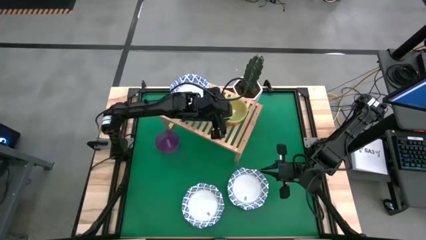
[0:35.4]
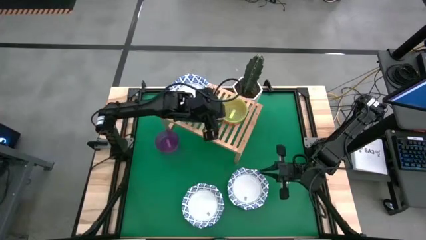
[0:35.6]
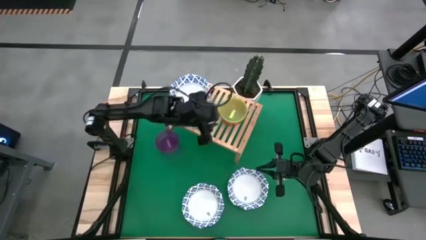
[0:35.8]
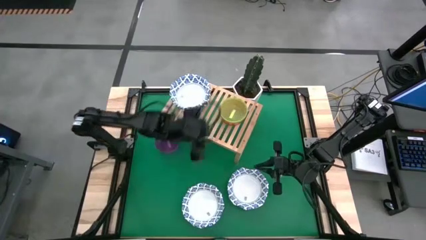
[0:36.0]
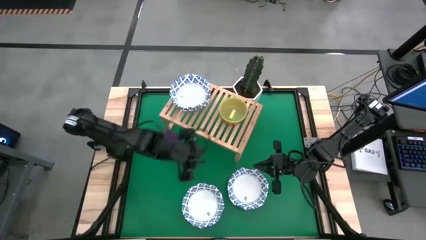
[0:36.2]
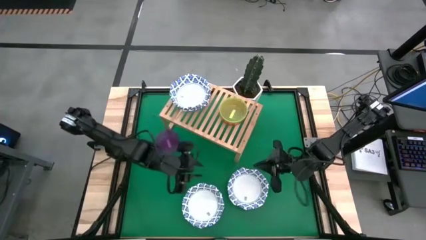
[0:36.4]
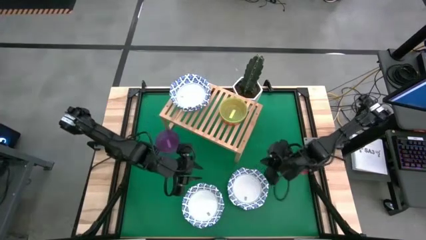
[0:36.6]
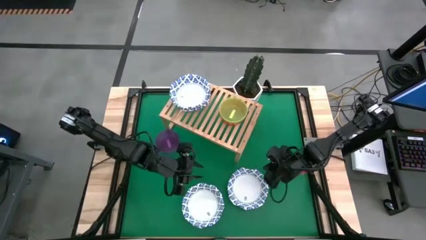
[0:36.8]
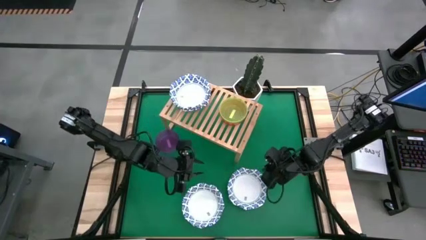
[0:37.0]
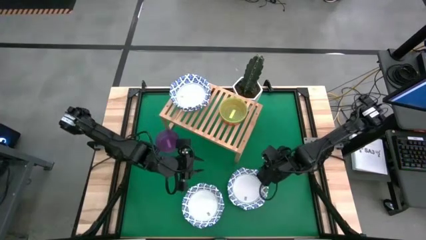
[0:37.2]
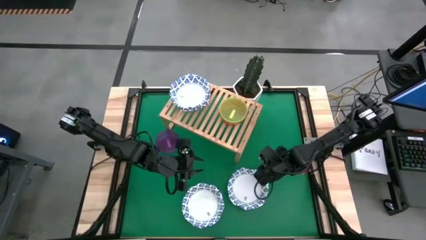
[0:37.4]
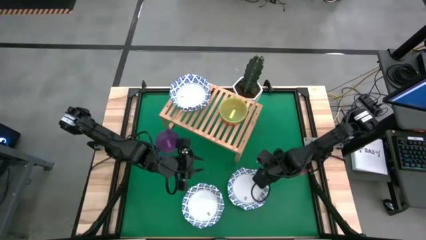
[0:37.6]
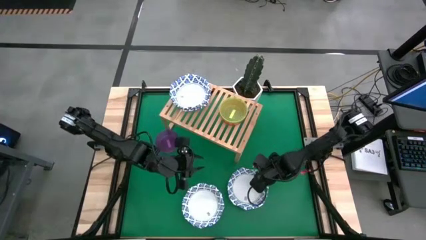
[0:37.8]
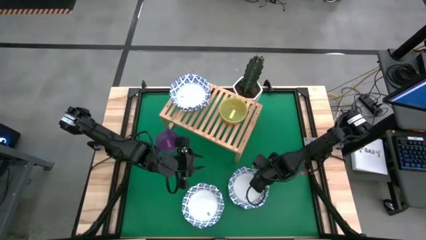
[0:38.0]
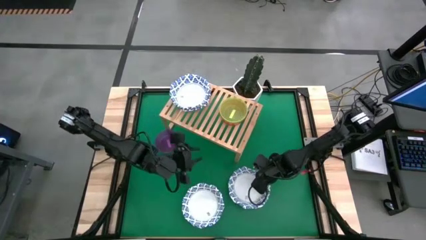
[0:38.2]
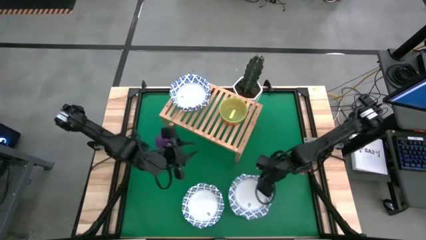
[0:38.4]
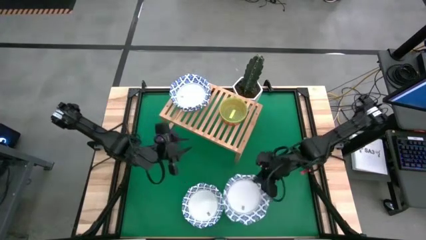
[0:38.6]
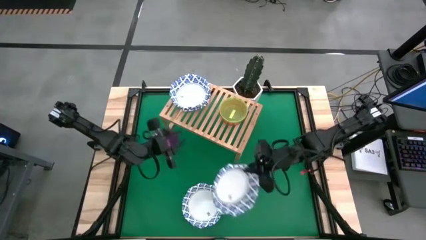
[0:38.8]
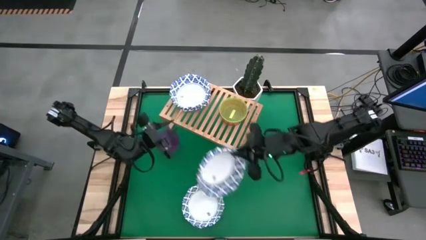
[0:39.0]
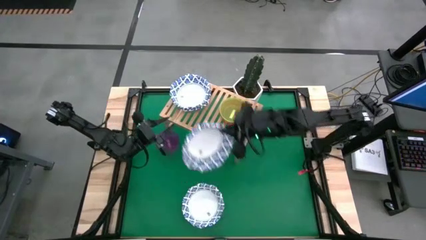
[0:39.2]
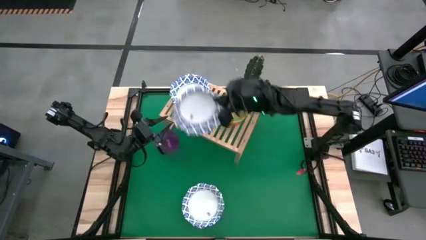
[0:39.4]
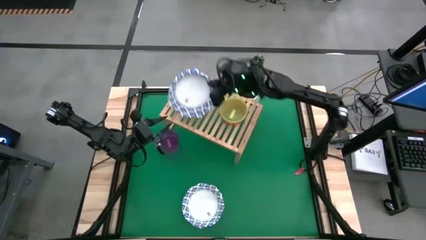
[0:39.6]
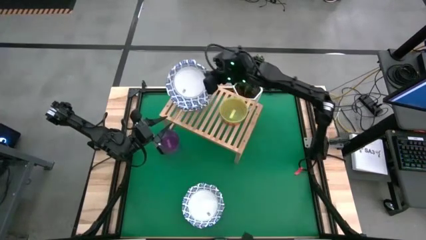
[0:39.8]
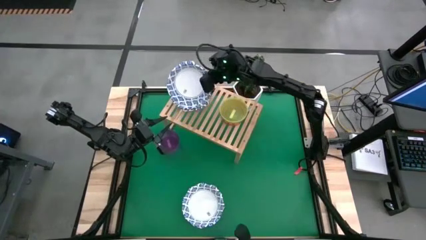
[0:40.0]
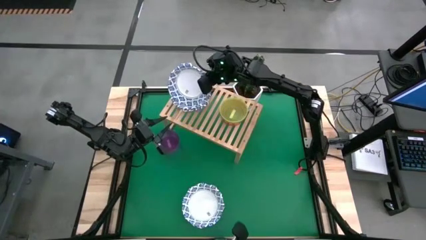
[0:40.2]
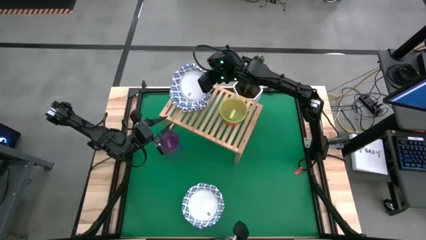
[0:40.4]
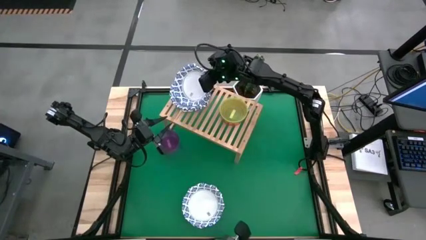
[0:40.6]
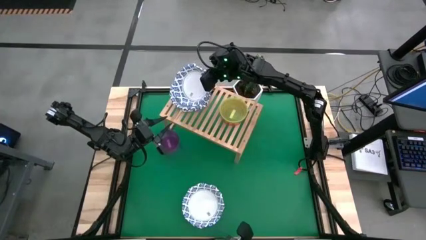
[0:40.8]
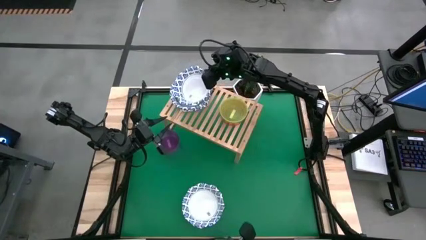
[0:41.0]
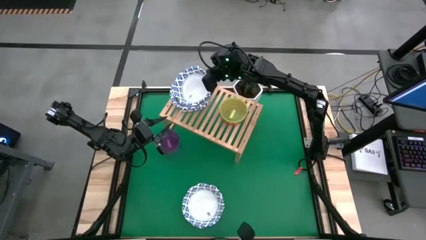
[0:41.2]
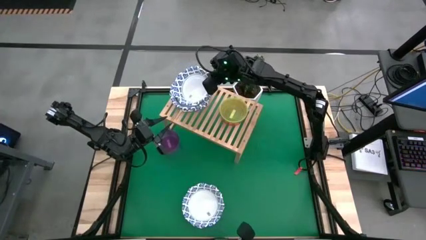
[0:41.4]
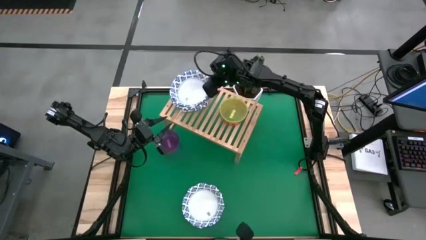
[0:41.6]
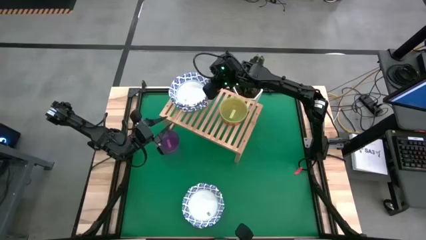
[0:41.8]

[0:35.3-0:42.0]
Task: Place and stack bowls onto a shelf
Stack the blue and white bowl on top of the blue and white bowl on the shelf

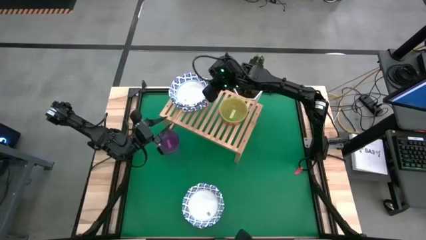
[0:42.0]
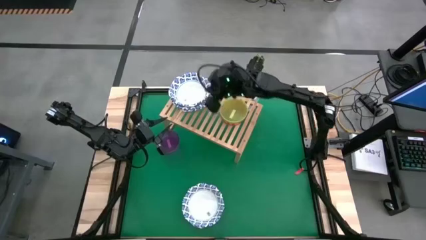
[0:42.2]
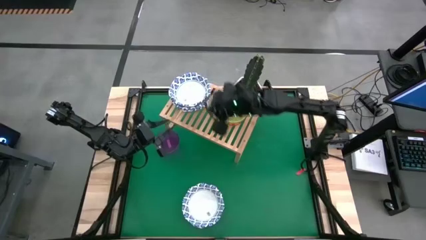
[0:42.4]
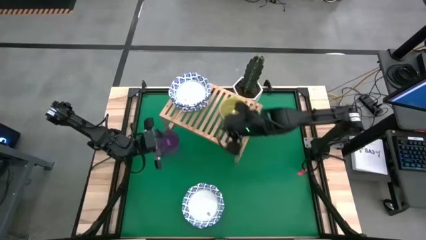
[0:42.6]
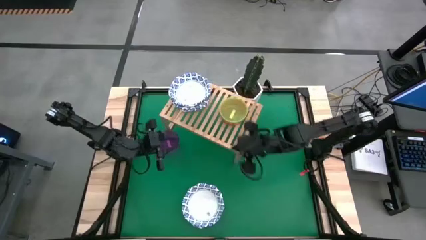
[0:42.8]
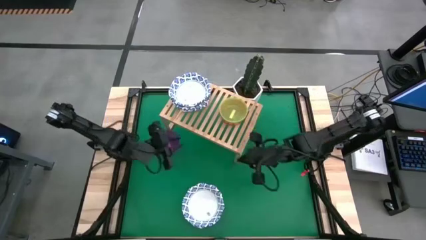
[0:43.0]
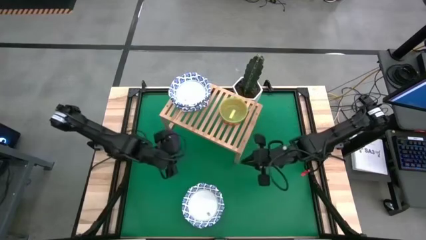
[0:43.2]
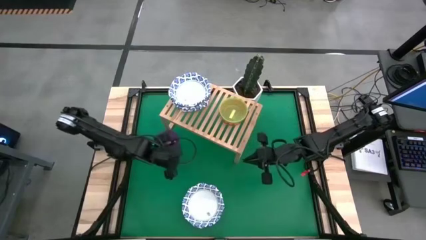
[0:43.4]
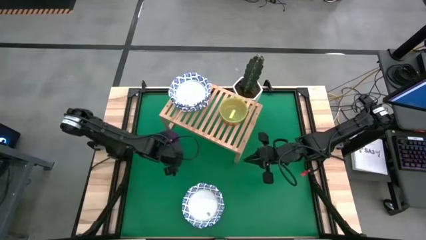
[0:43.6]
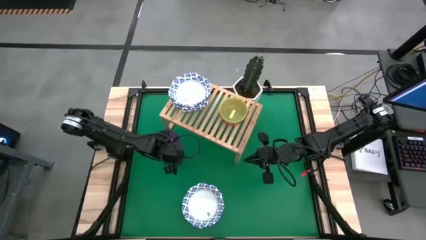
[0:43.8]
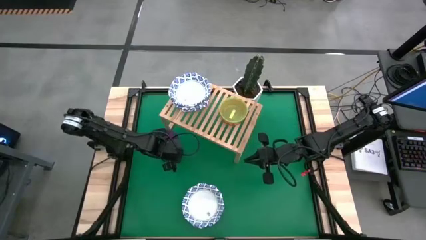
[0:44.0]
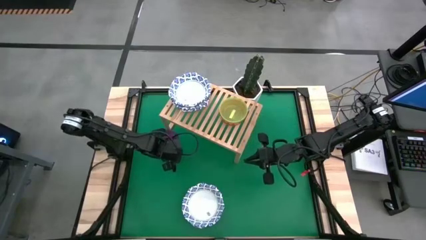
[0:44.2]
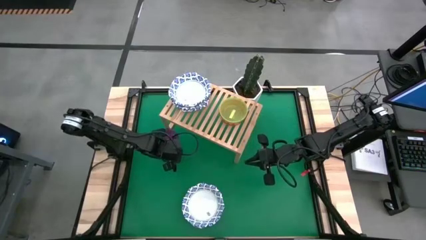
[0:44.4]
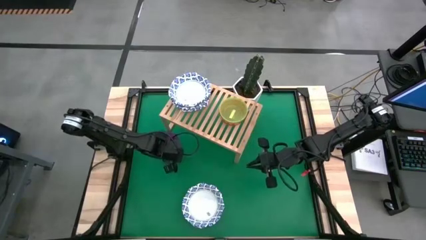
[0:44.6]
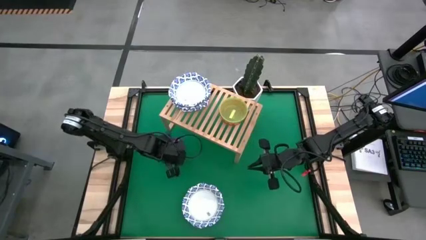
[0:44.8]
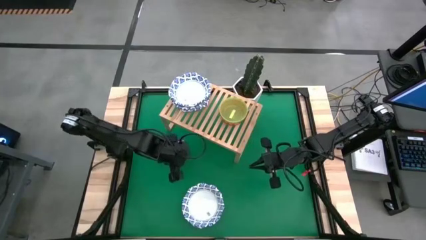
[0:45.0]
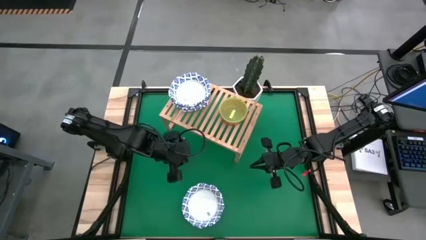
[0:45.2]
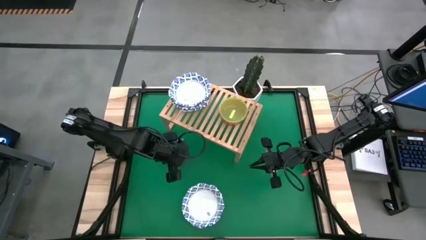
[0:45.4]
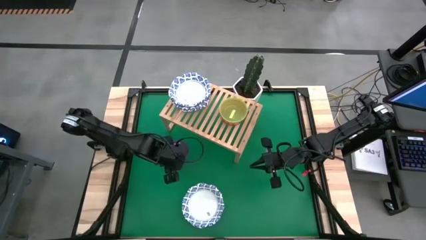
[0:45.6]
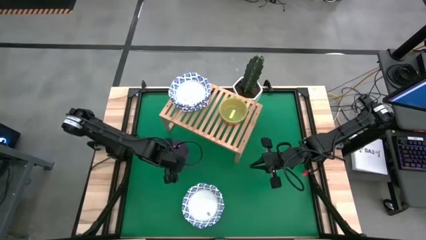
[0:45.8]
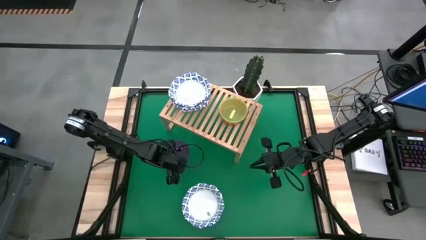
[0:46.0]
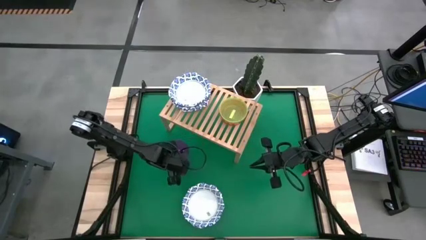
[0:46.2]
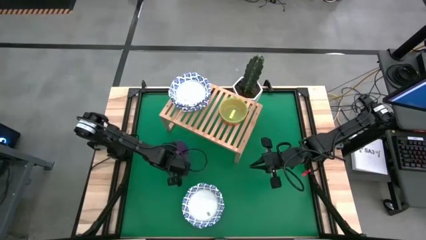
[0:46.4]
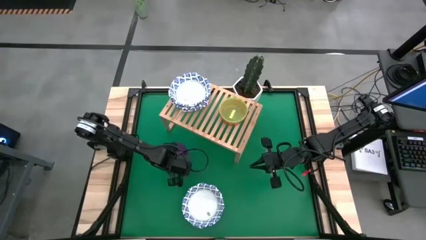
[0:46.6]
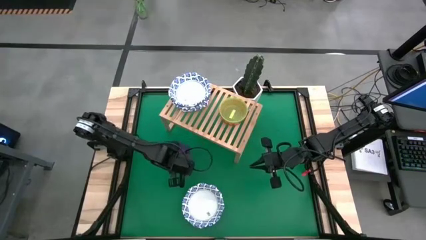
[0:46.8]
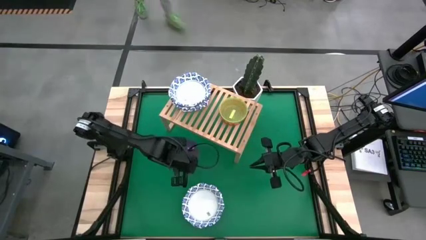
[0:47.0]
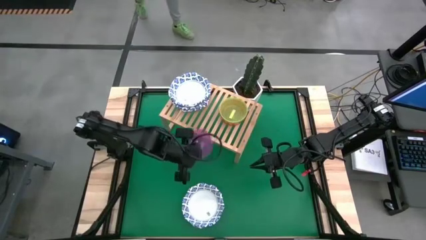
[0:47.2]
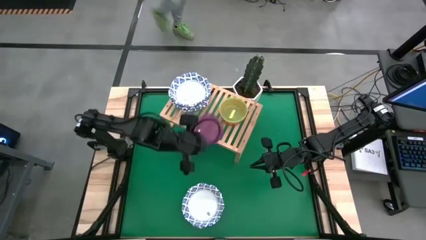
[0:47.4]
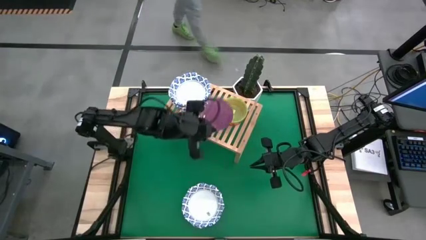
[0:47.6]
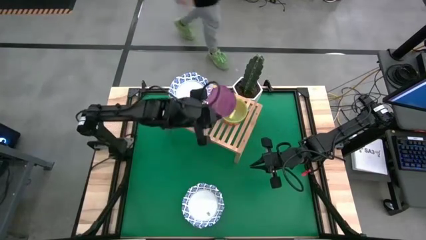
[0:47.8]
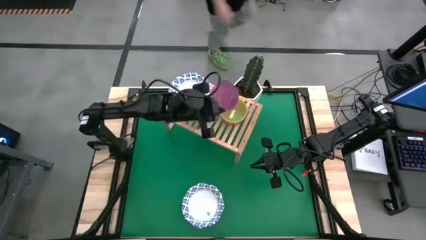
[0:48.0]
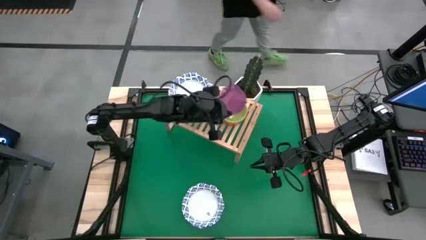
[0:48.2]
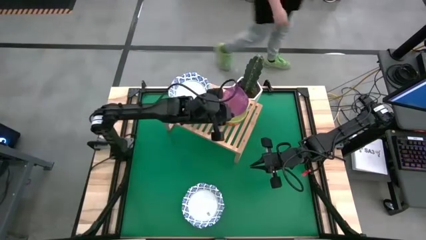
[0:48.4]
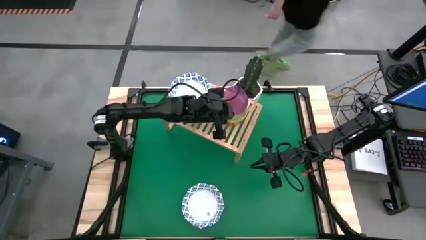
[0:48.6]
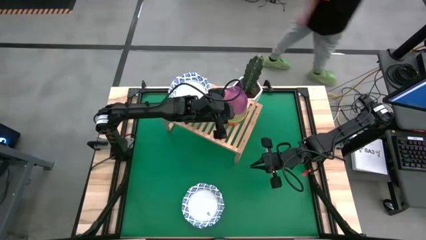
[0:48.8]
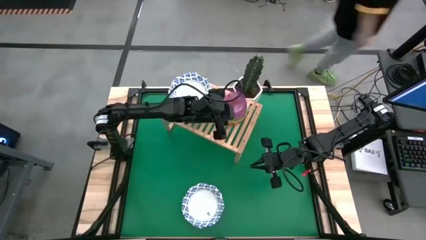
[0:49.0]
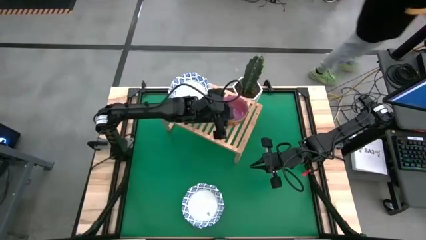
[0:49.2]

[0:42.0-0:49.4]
Stack the violet bowl on top of the yellow bowl on the shelf

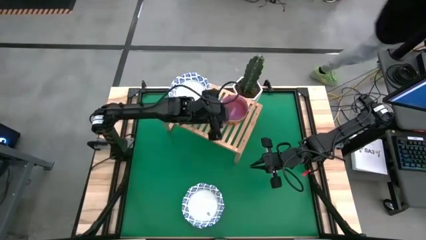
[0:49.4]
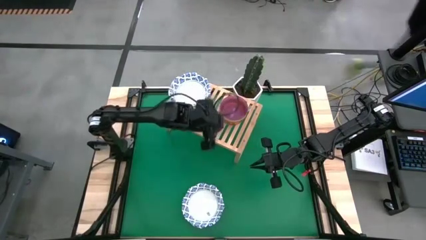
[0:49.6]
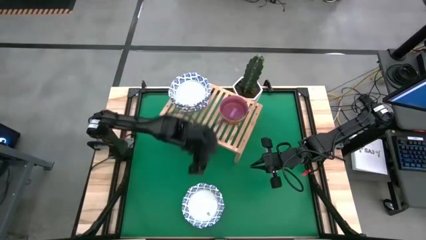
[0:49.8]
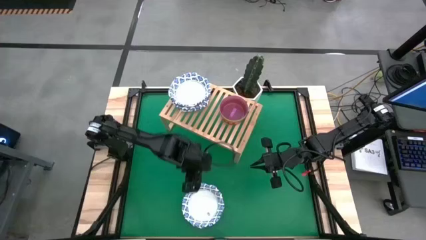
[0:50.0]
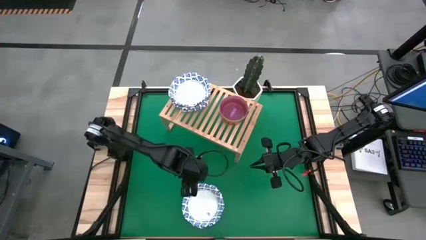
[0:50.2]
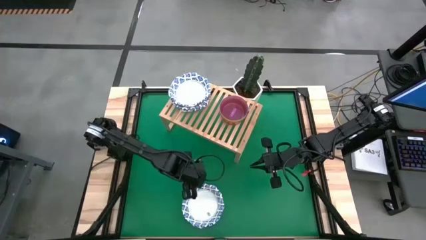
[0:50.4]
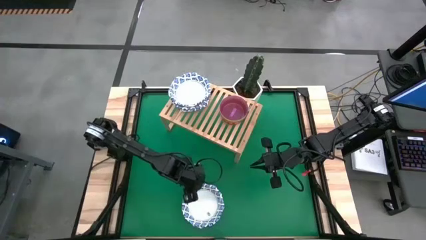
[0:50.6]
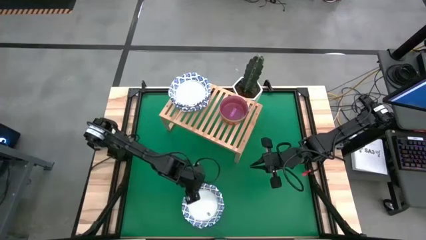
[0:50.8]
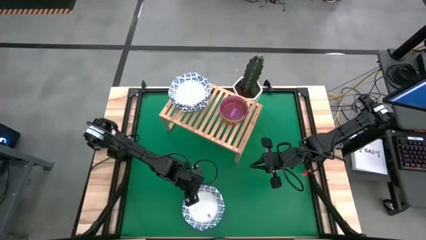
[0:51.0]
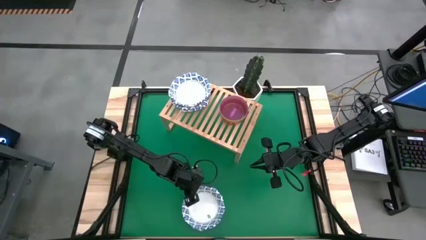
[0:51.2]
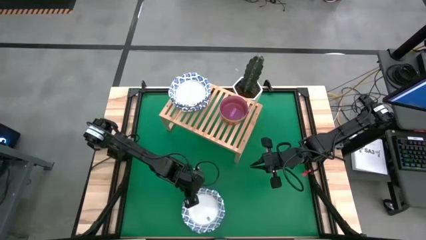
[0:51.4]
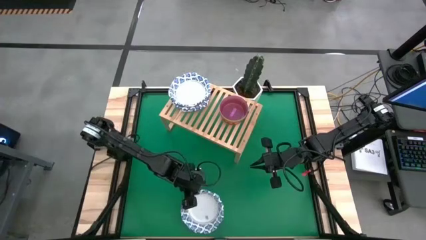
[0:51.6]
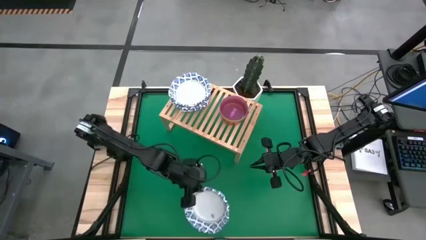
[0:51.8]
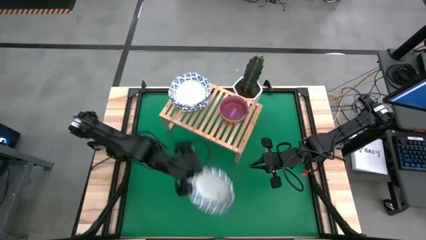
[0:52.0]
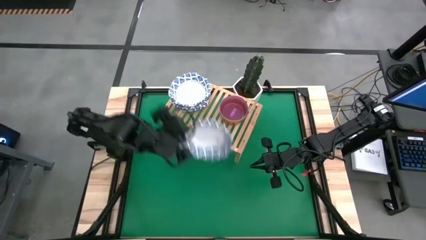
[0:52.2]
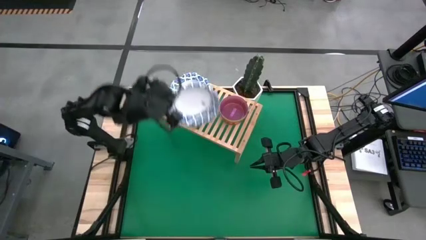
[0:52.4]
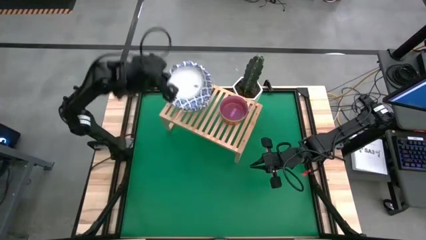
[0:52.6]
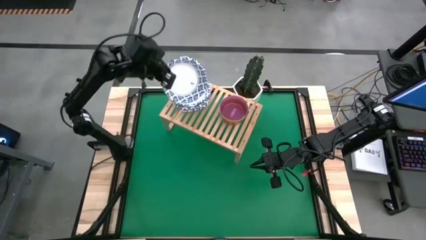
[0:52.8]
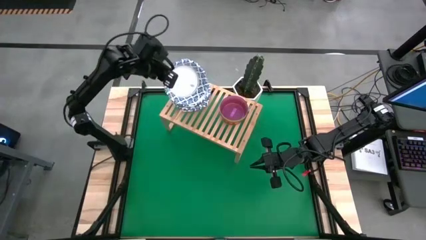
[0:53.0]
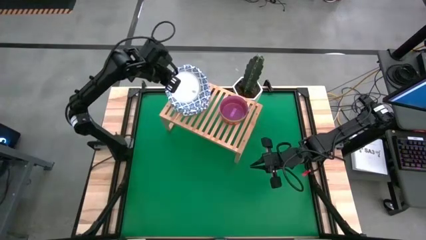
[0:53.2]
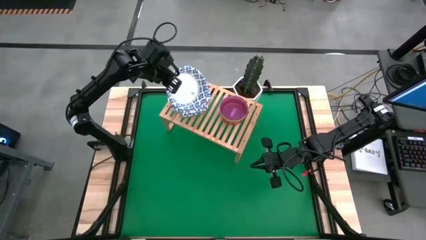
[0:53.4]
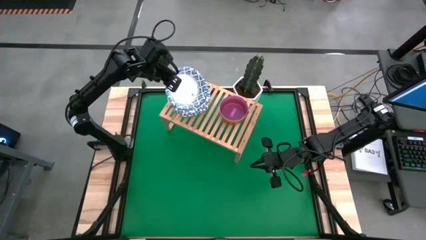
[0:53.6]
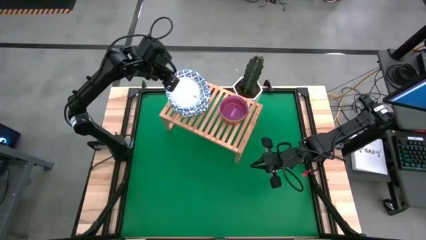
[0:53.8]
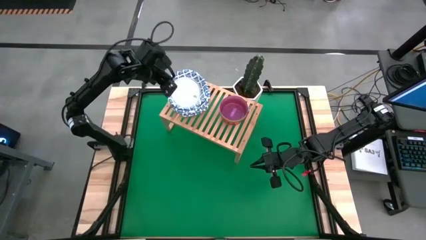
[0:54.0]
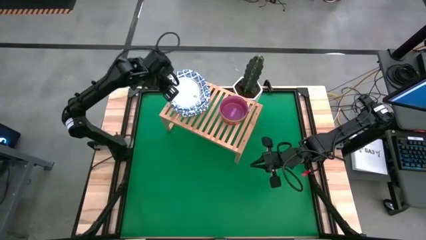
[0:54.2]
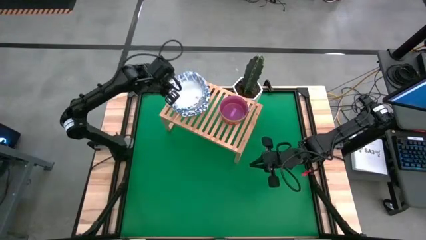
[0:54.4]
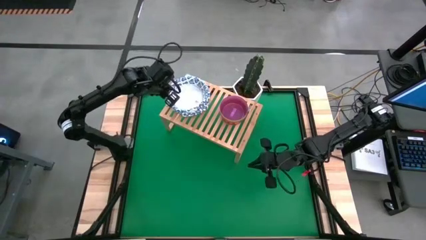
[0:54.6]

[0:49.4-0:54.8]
Stack the blue and white bowl on top of the blue and white bowl on the shelf
